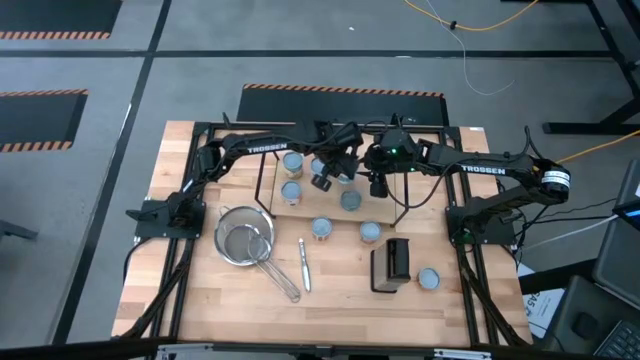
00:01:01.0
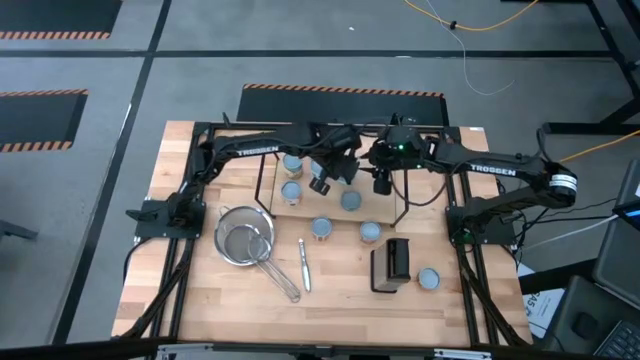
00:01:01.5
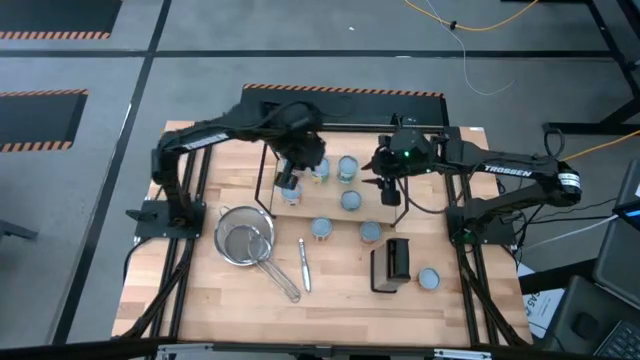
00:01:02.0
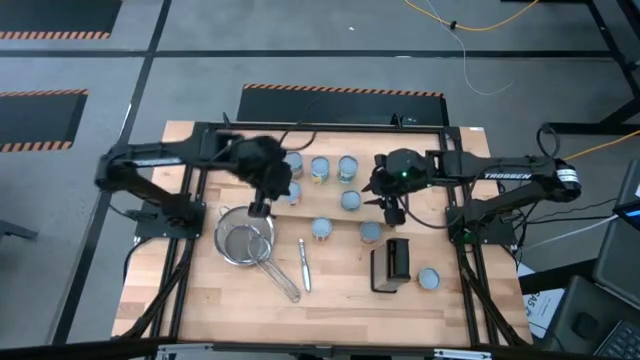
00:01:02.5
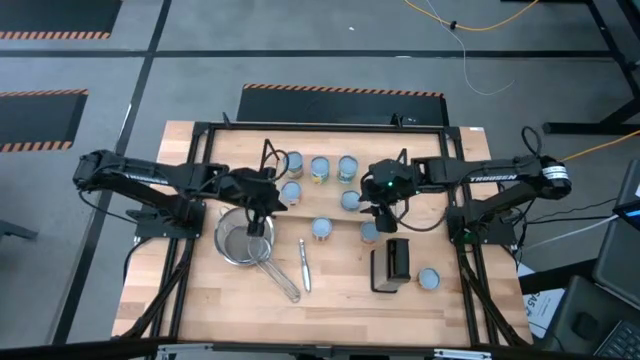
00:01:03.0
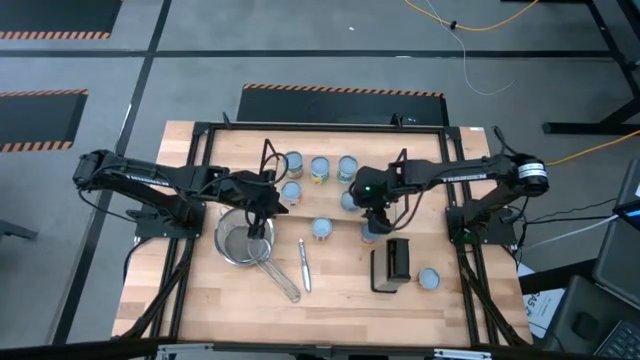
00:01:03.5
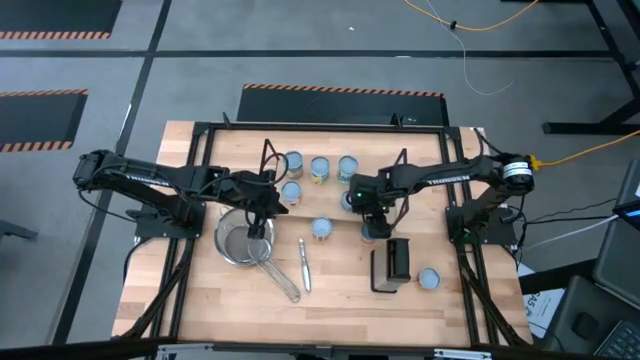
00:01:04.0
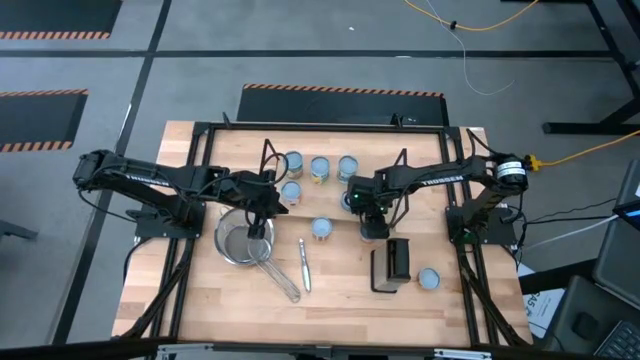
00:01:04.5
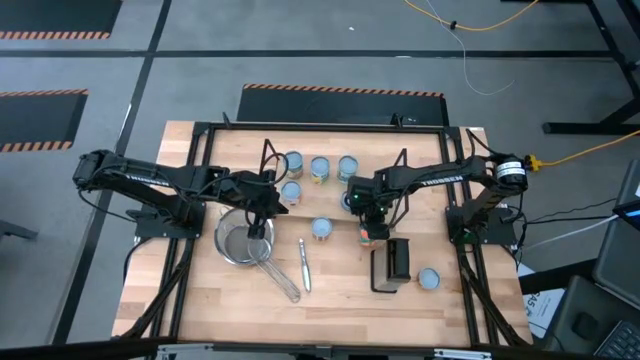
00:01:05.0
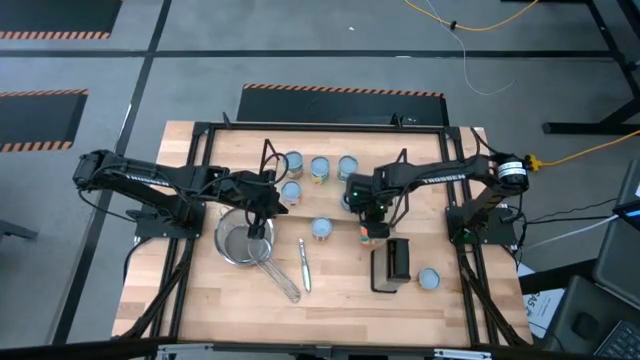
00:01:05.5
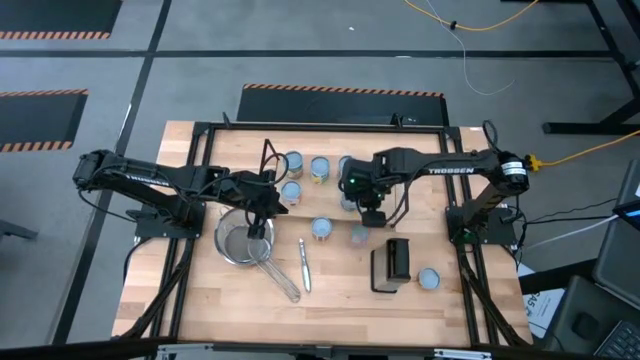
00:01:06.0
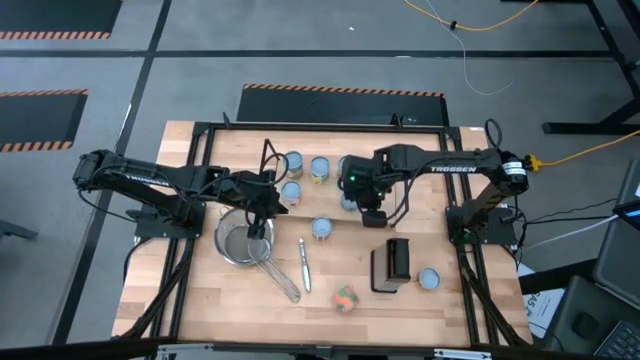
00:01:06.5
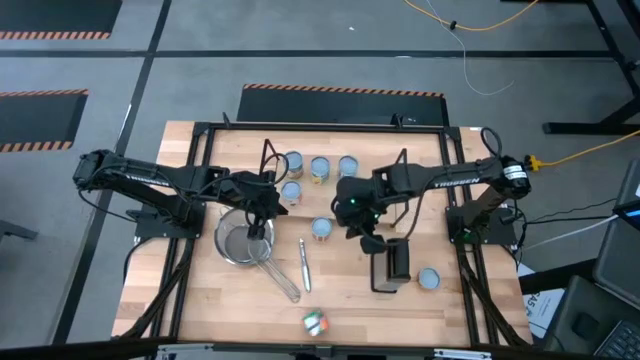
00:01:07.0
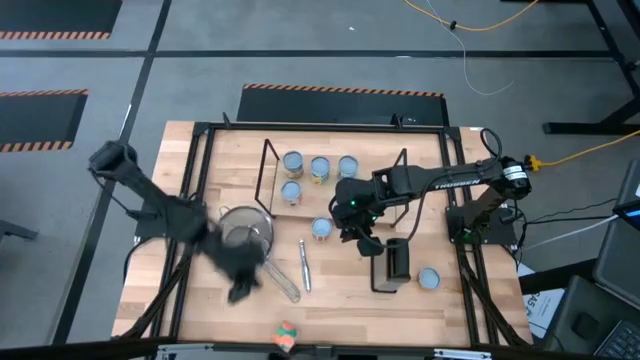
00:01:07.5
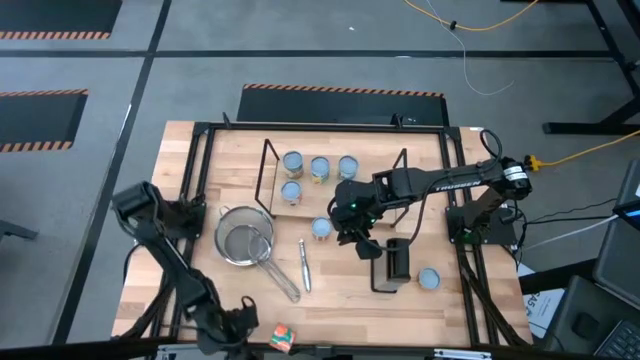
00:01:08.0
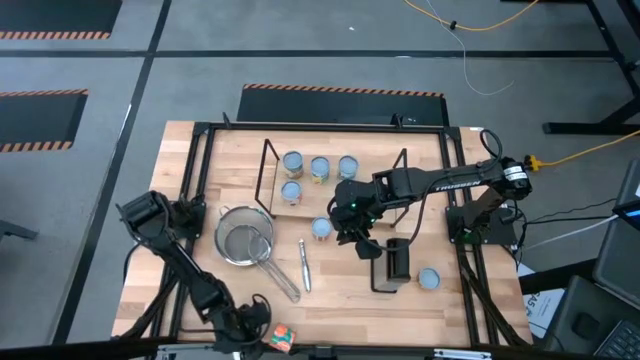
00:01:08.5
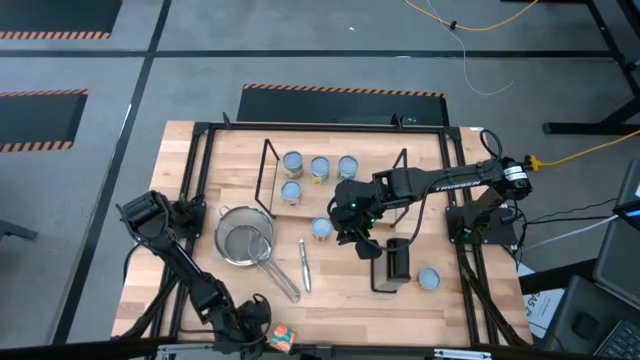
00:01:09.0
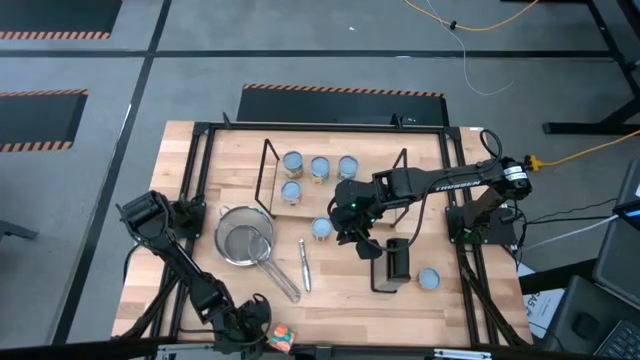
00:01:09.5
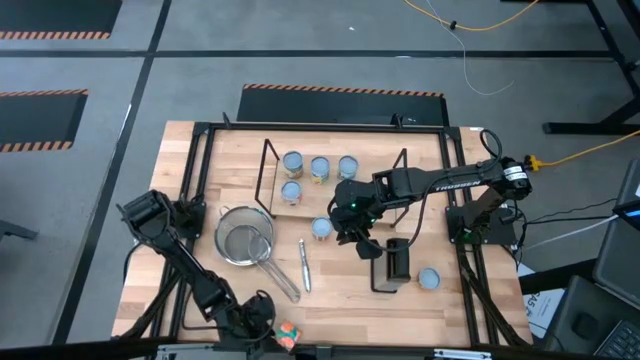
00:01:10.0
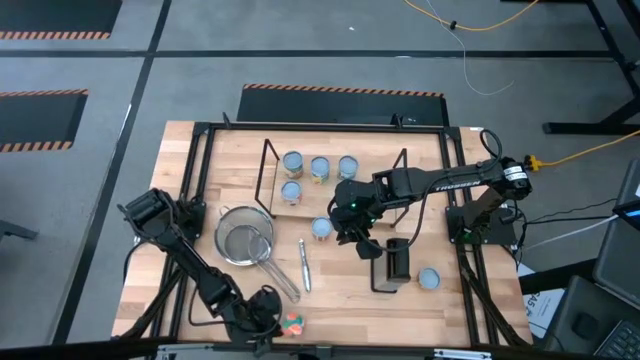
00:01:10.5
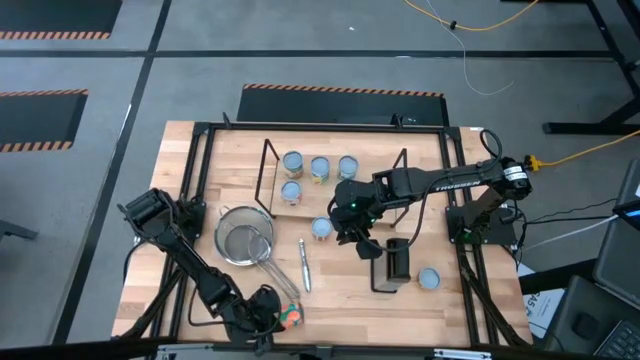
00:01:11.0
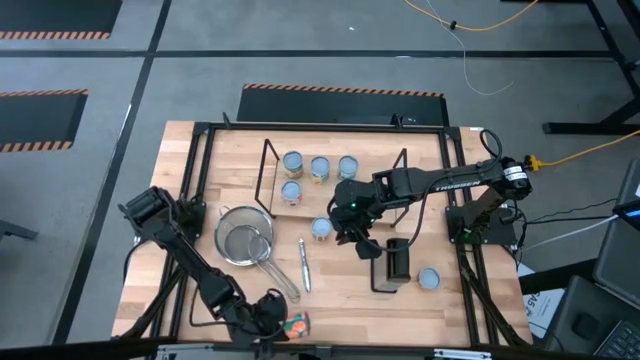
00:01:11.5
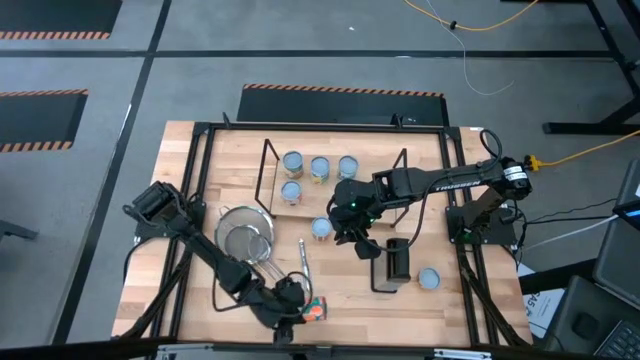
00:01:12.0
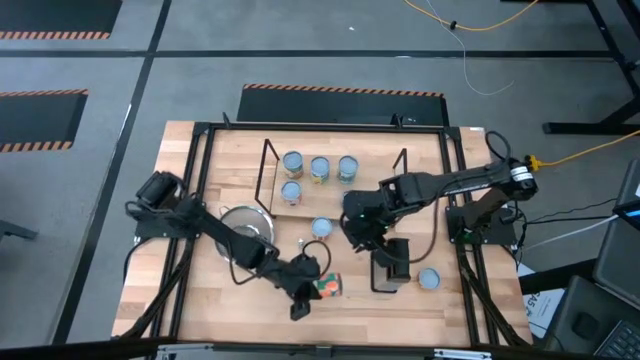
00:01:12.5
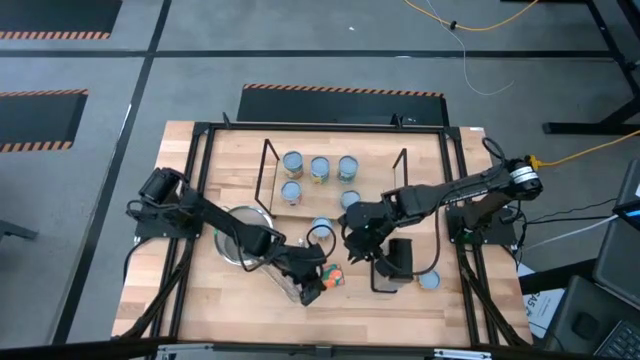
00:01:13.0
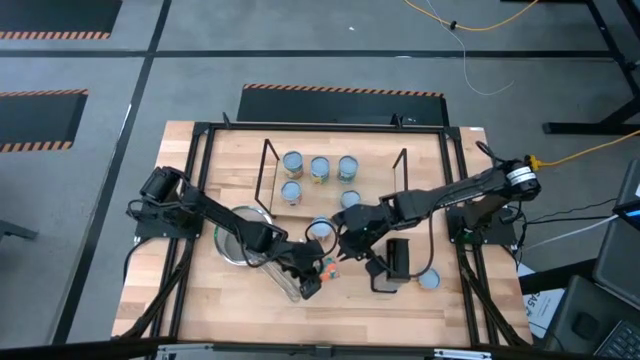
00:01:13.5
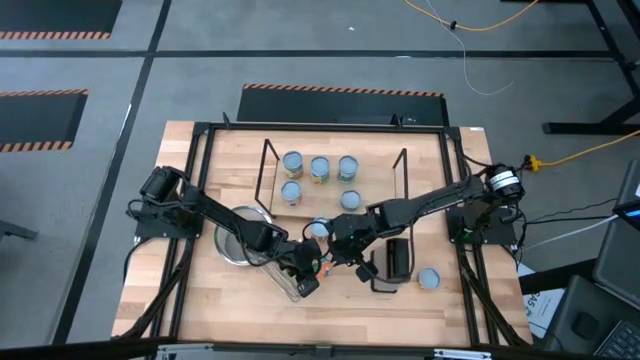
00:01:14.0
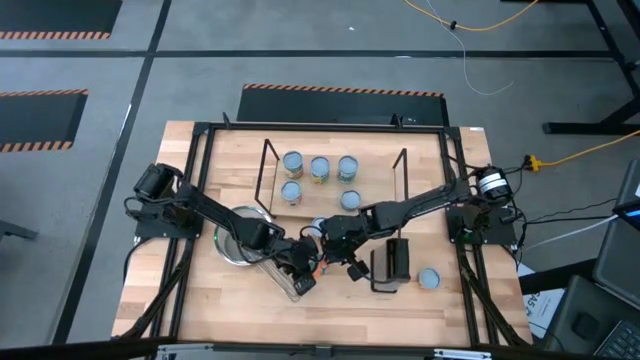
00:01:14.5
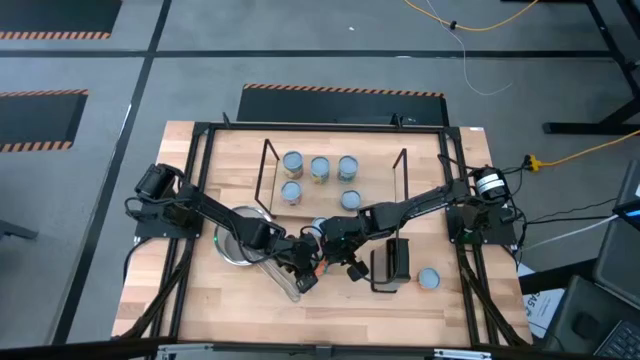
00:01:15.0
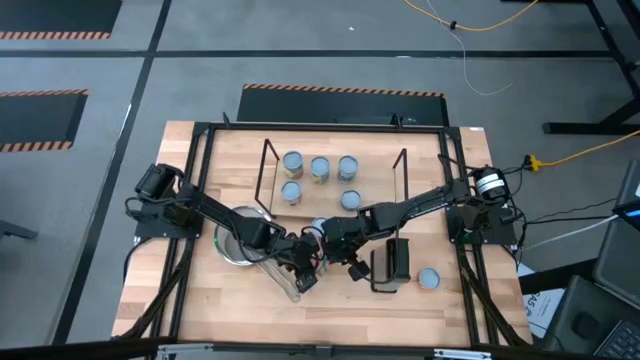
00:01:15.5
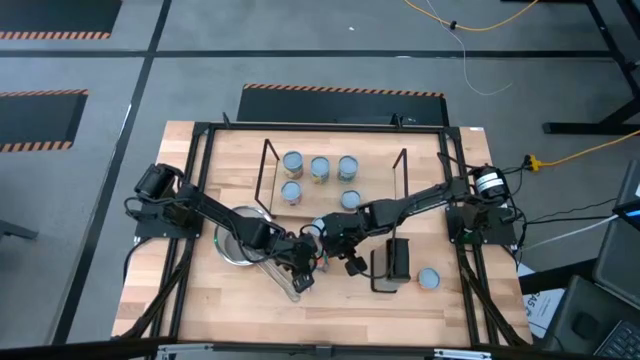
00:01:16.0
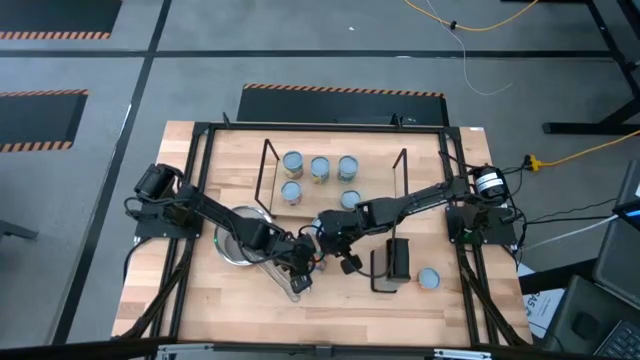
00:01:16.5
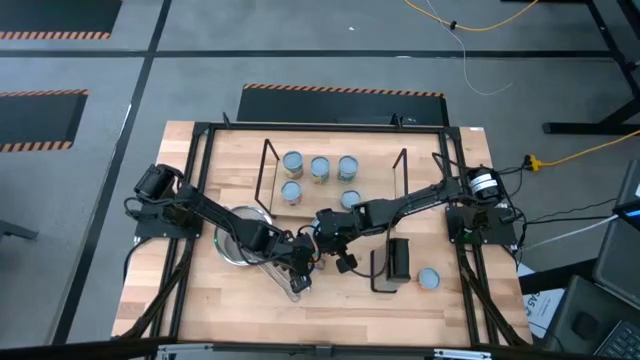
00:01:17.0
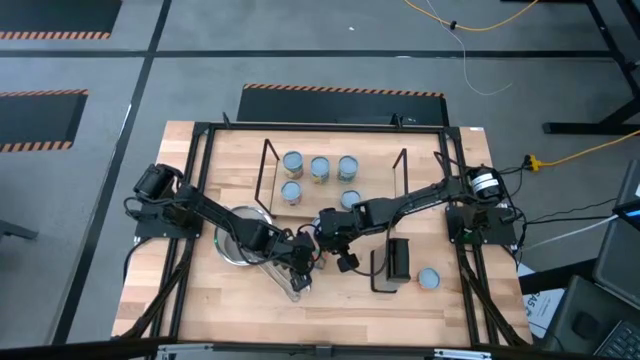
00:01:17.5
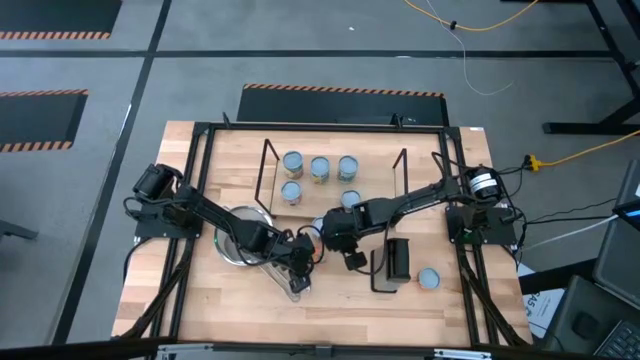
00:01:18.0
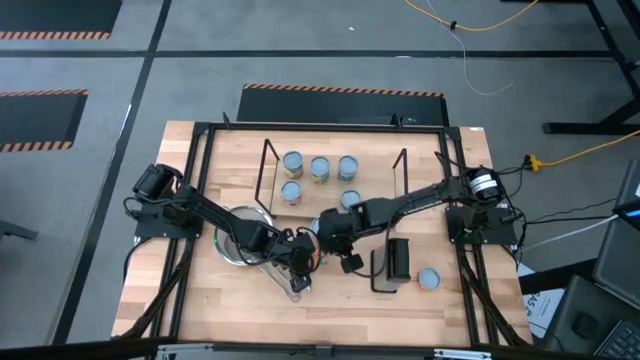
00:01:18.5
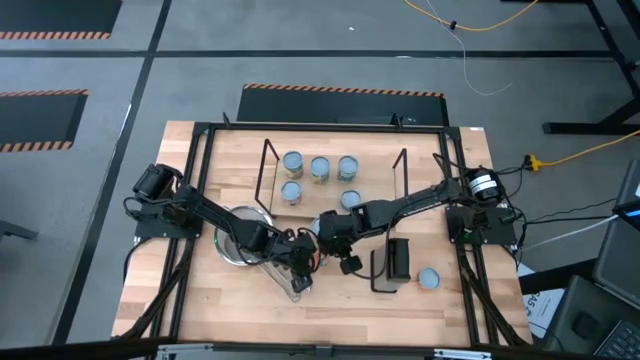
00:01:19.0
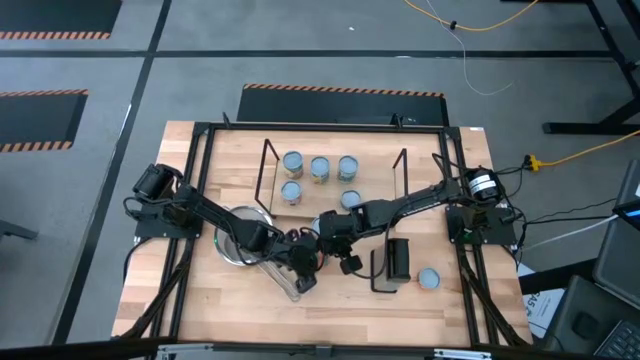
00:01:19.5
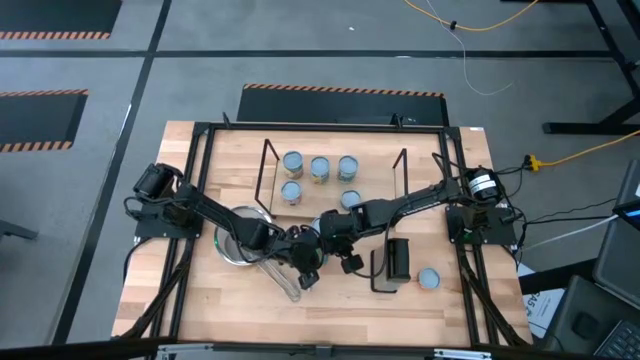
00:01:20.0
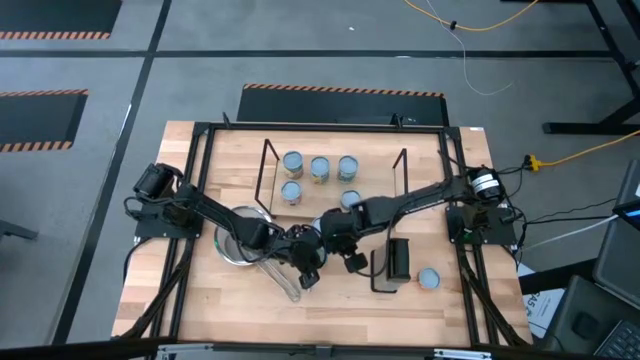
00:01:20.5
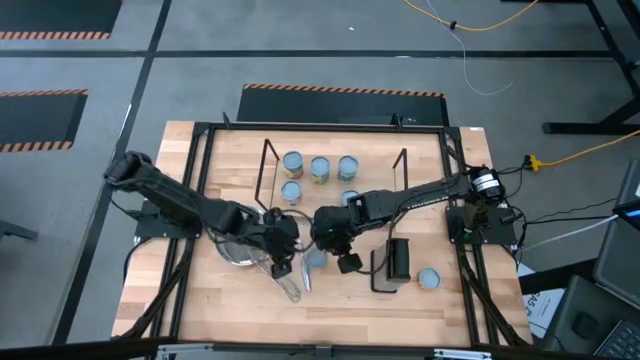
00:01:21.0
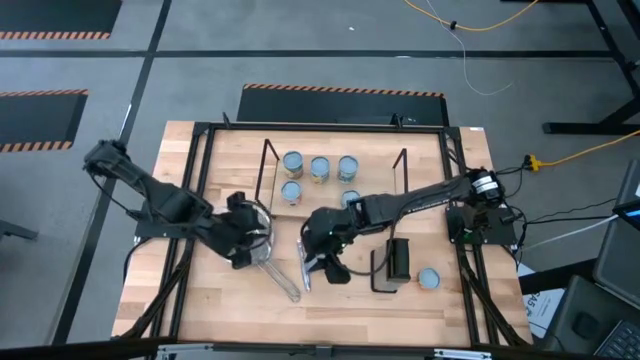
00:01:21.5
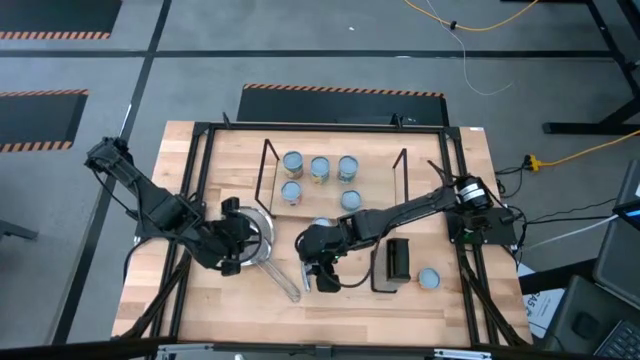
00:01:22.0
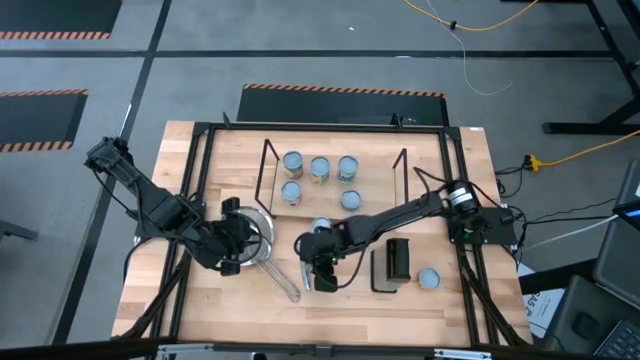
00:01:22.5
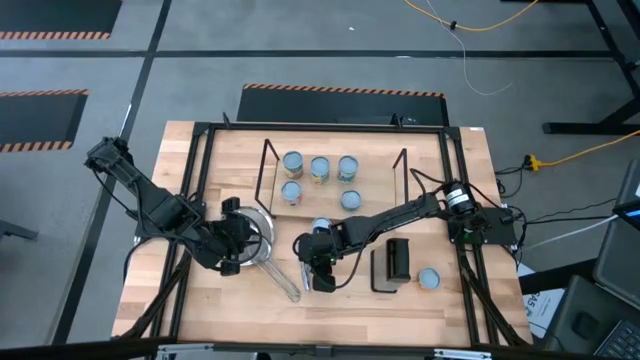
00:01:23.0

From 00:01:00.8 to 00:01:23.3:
Task: Pick and place cans onto a shelf
Put the green can on the shelf
